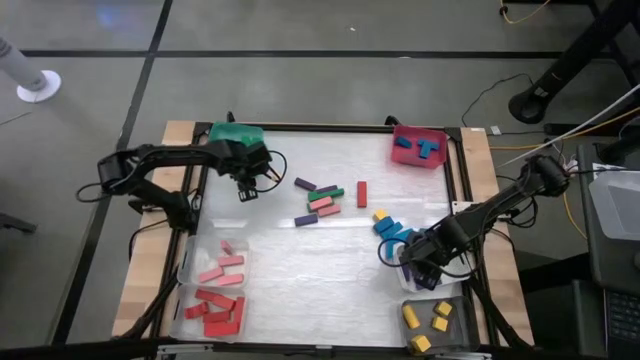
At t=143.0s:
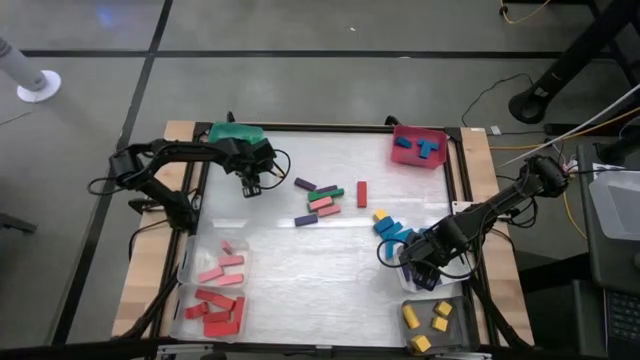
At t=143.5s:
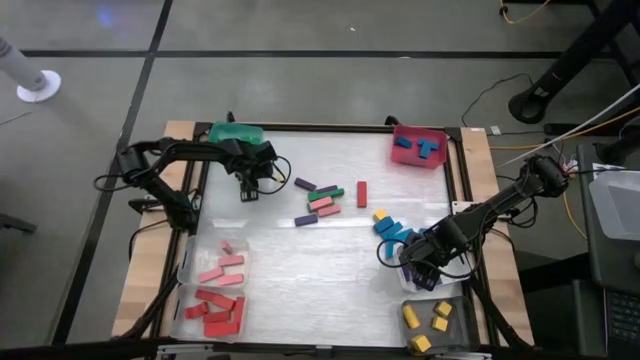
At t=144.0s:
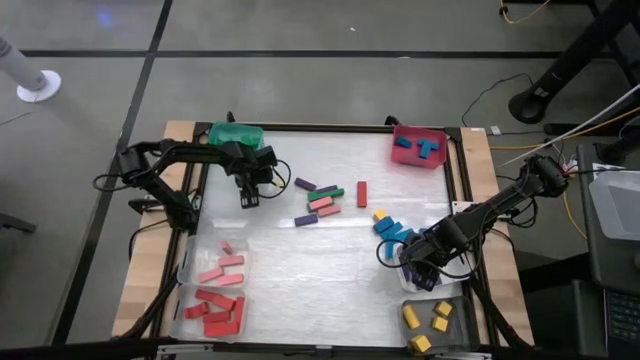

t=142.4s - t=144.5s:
Task: Sort blocks
Put the green block into the green bin

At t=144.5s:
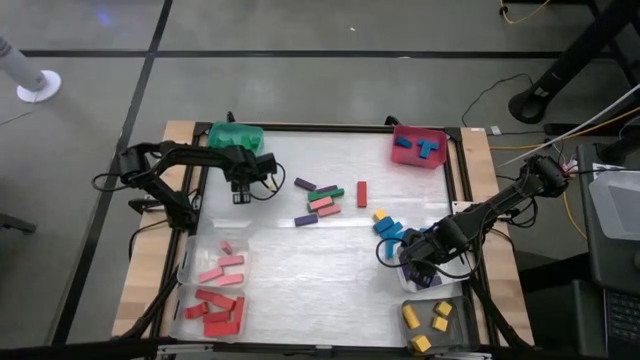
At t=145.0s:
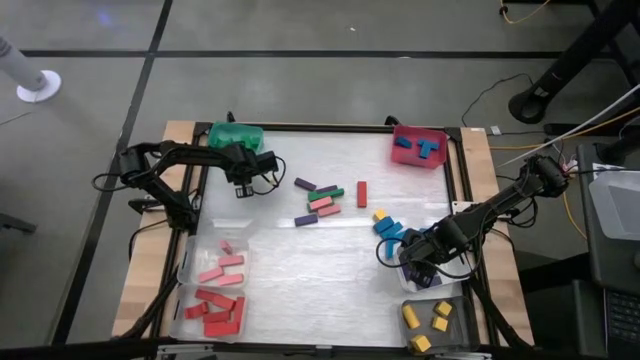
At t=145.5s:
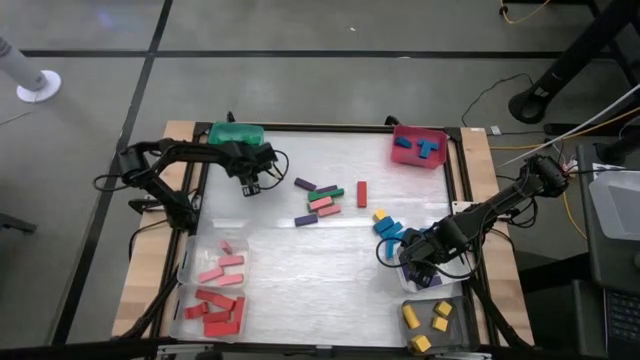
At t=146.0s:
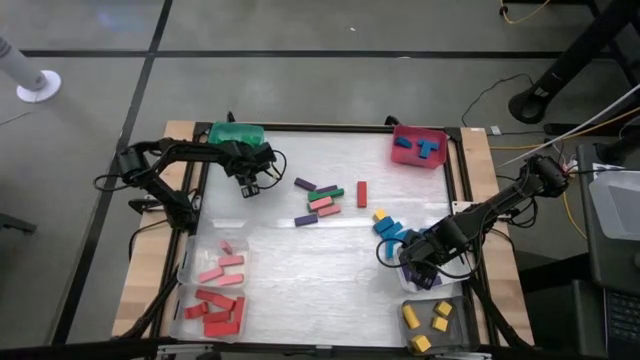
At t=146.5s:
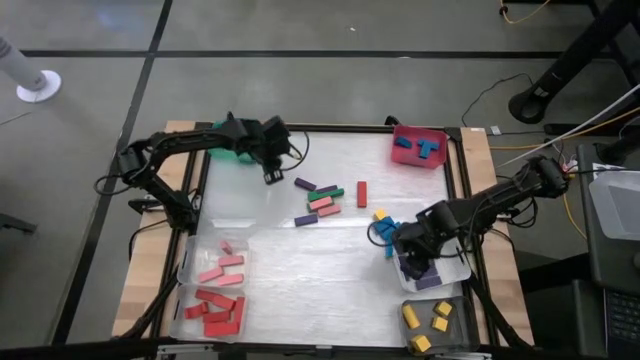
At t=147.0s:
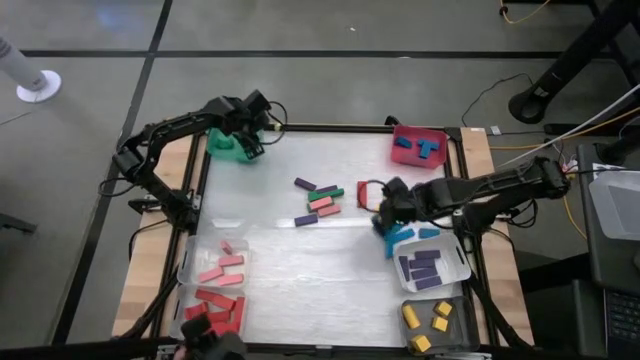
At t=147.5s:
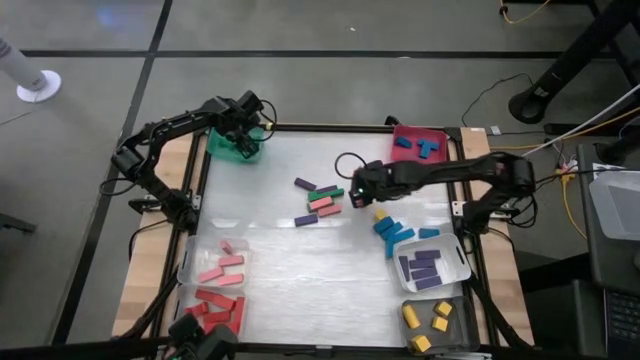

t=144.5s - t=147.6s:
Put the green block into the green bin

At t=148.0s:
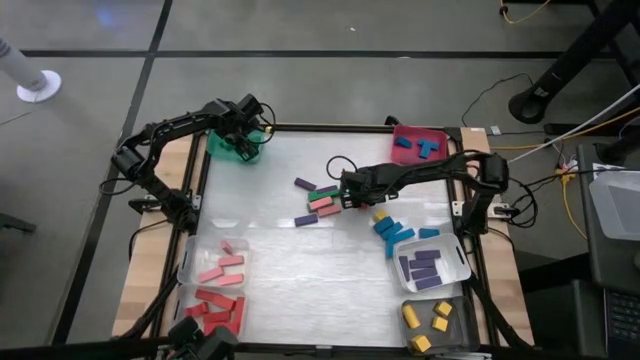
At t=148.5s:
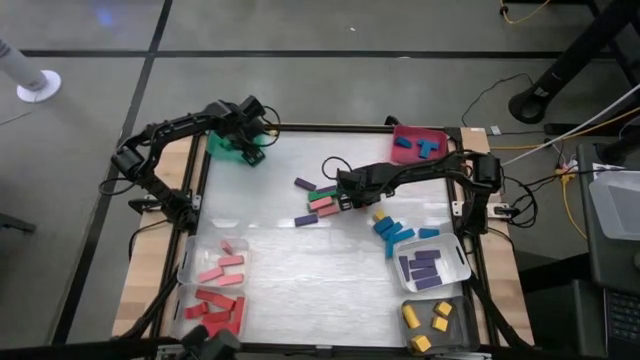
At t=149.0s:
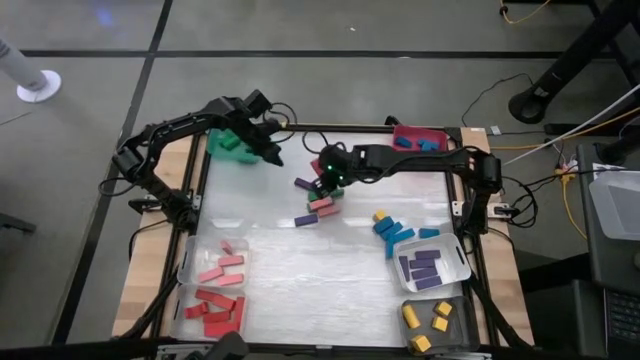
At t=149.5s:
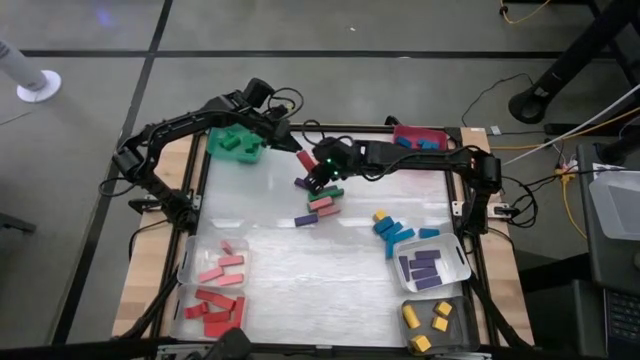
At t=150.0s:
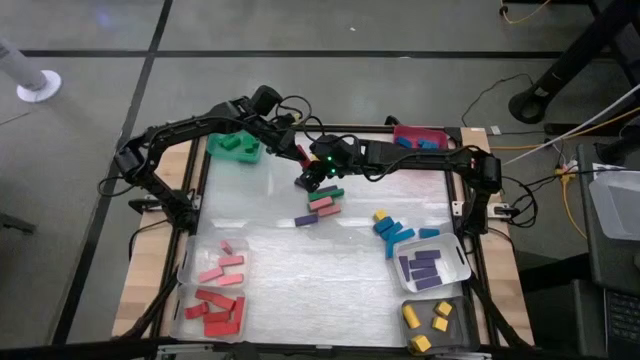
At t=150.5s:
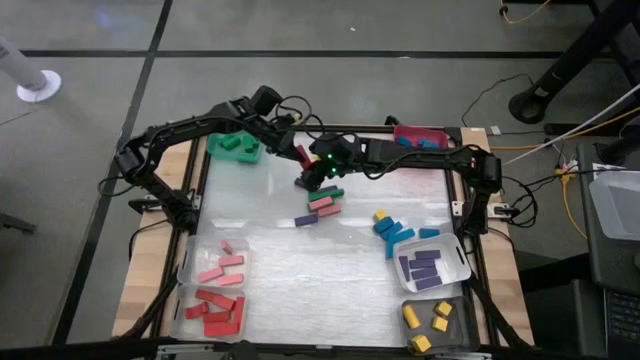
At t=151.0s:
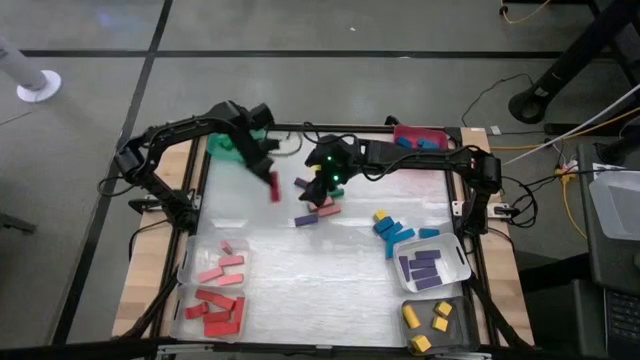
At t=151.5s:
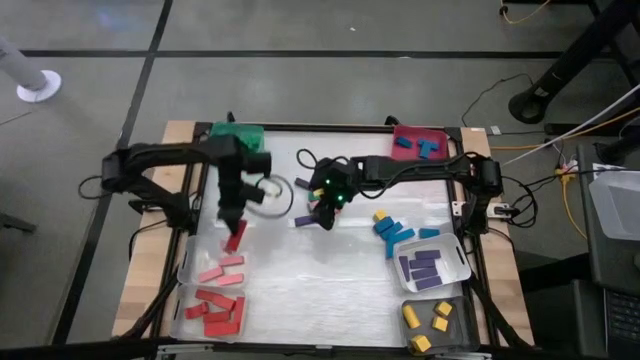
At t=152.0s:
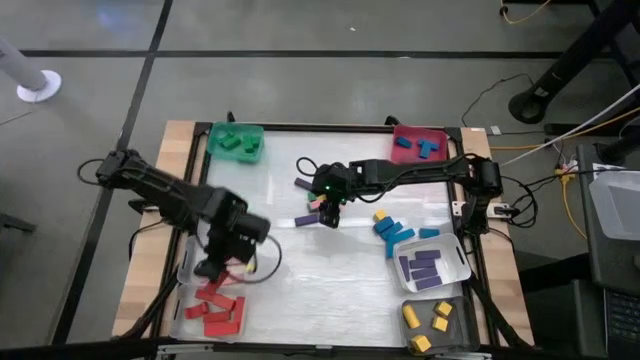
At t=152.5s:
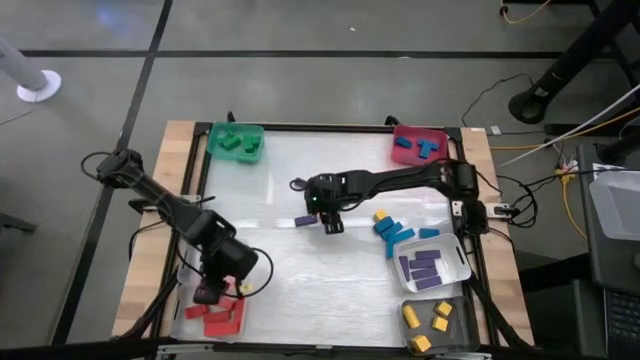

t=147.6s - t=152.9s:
Put the red block into the bottom transparent bin

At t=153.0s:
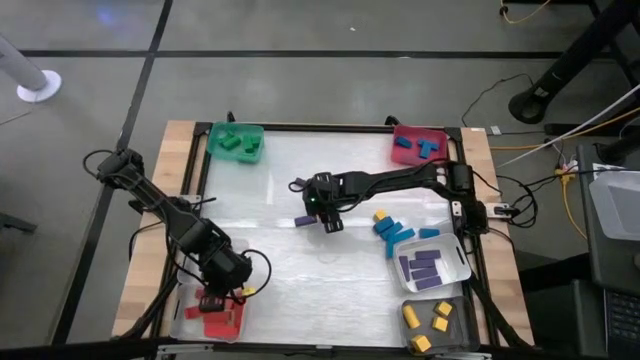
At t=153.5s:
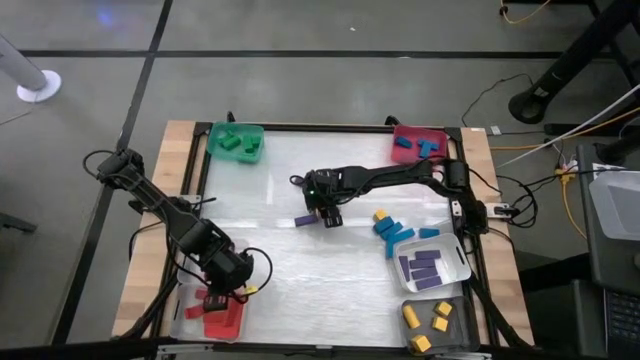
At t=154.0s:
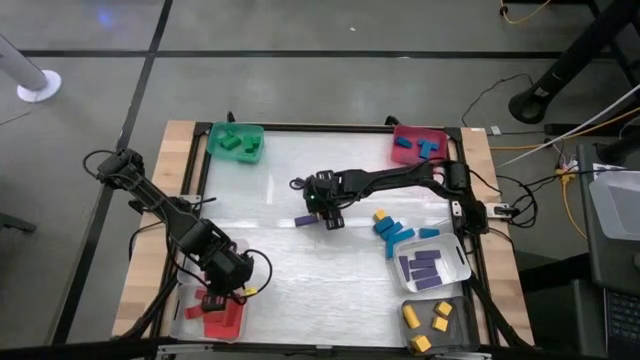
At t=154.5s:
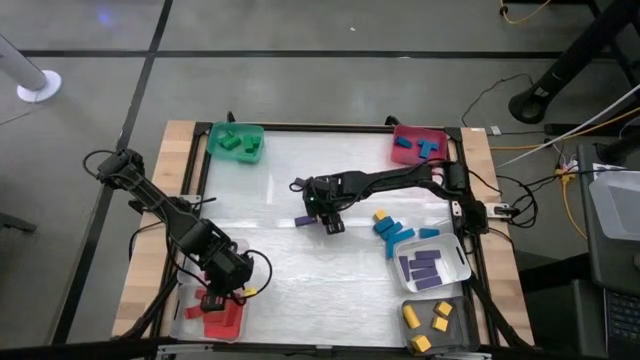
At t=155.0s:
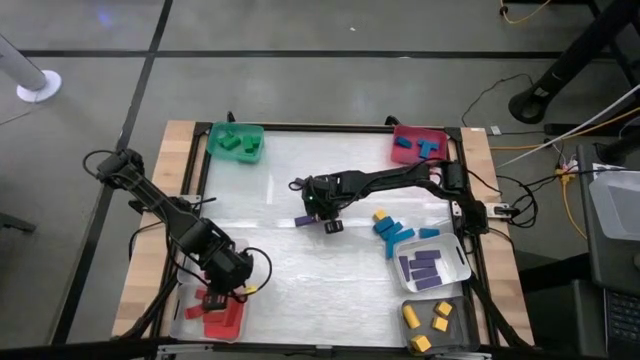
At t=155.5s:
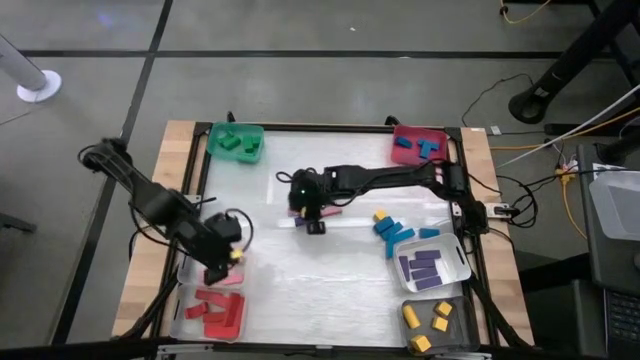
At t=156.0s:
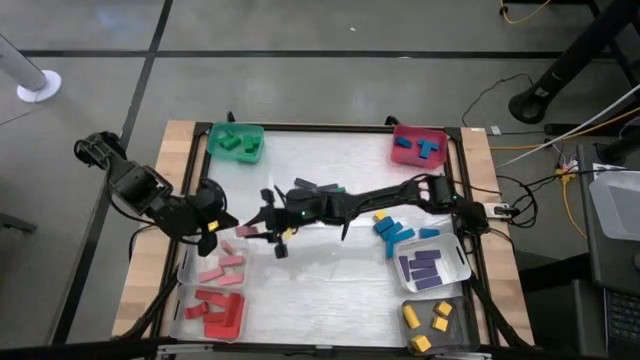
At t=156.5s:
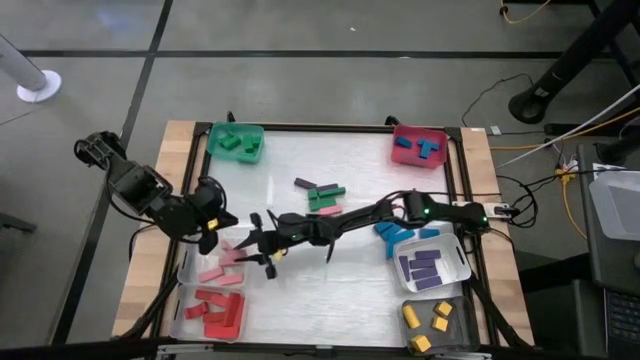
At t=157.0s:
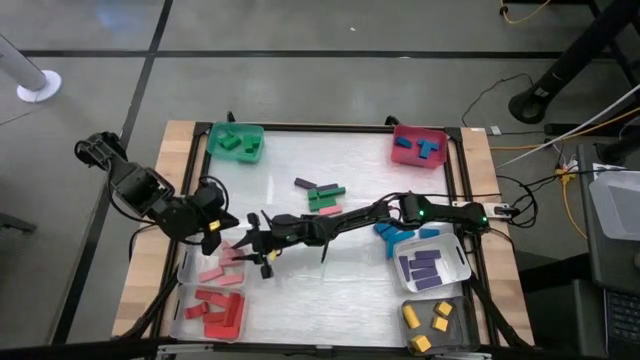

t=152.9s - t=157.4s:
Put the pink block into the top transparent bin

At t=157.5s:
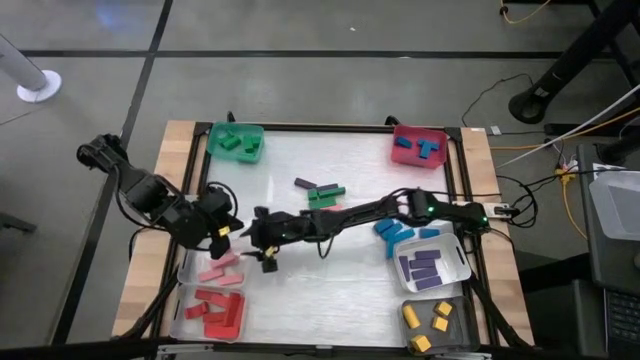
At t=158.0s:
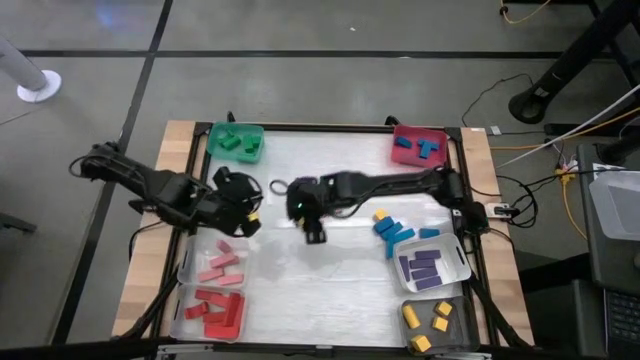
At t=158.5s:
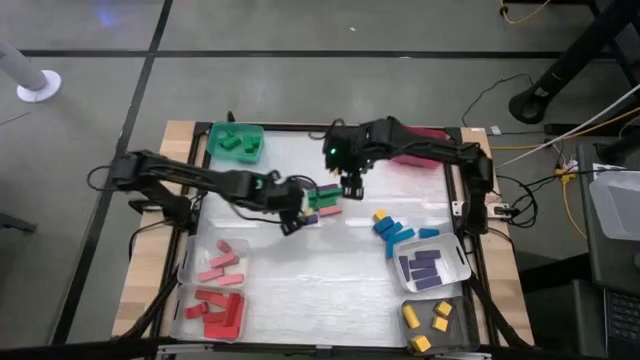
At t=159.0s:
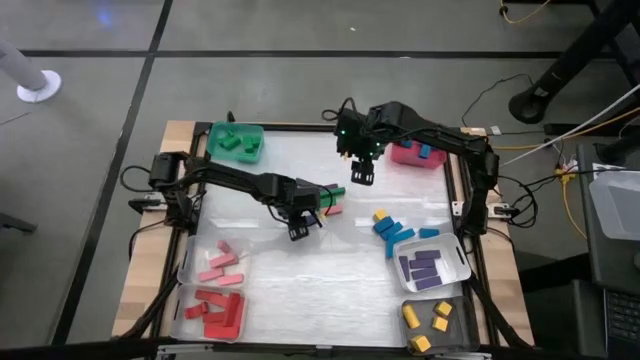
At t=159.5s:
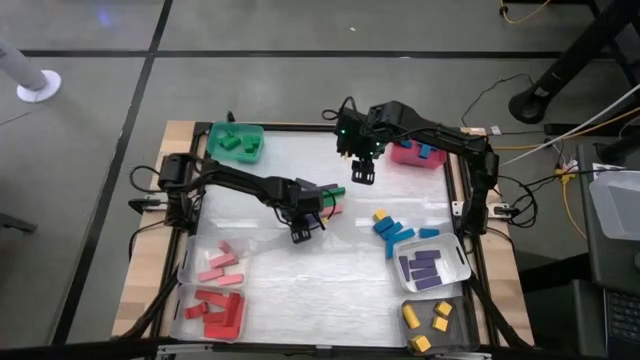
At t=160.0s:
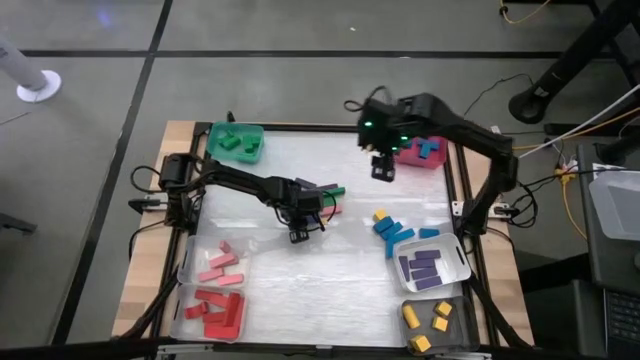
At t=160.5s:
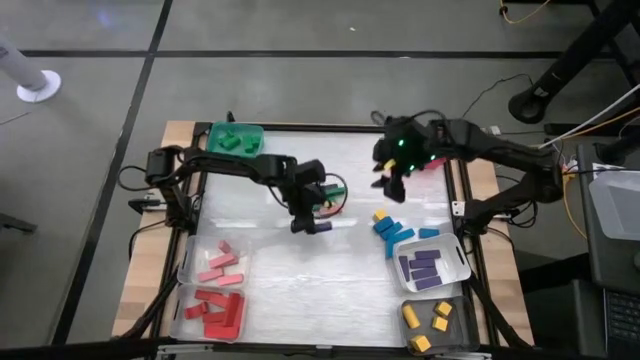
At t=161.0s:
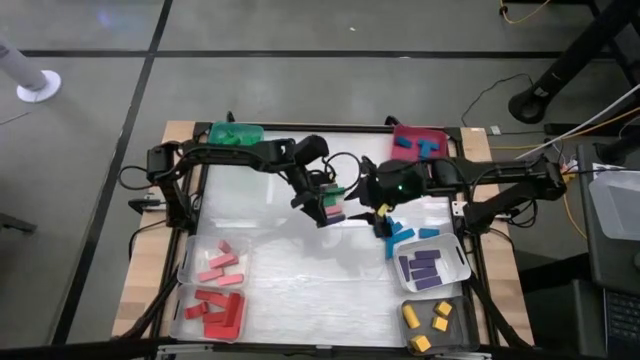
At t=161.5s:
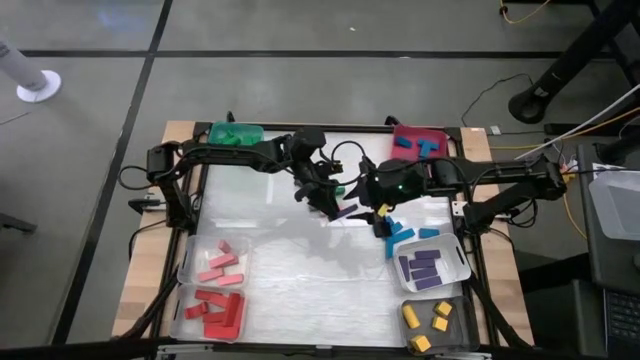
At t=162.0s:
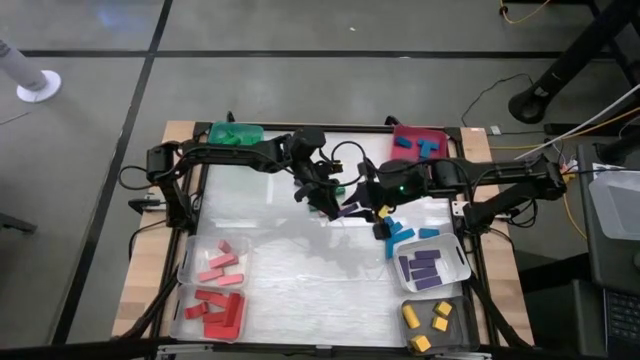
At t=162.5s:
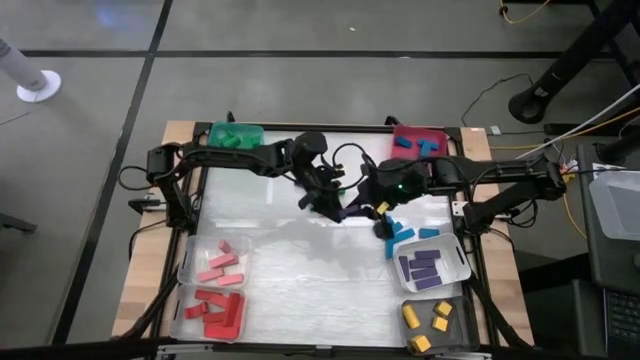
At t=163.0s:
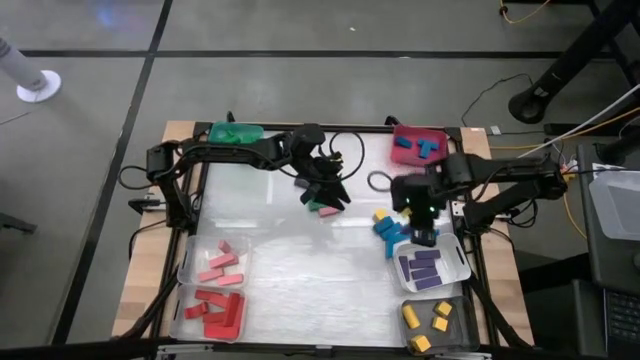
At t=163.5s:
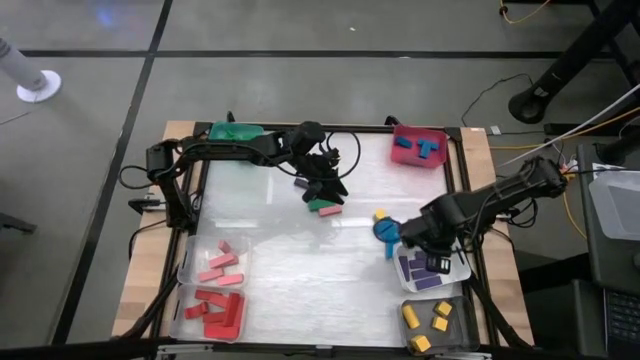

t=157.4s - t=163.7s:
Put the violet block into the white bin
